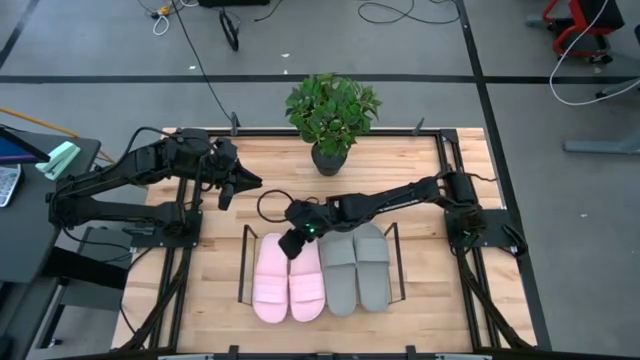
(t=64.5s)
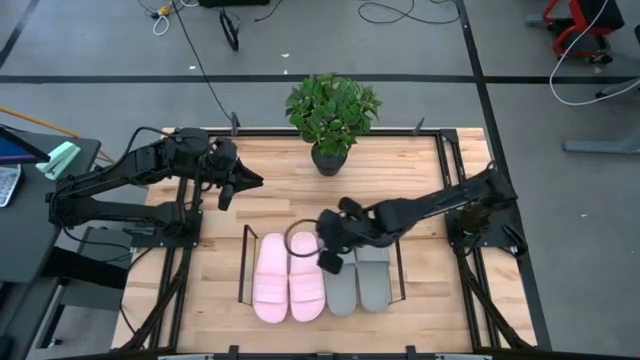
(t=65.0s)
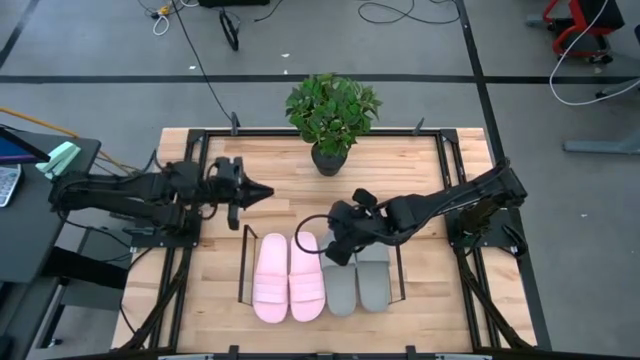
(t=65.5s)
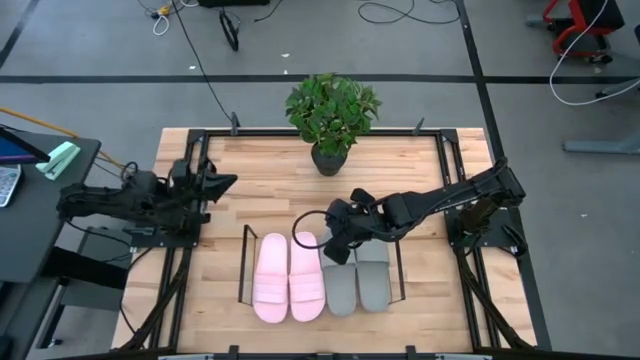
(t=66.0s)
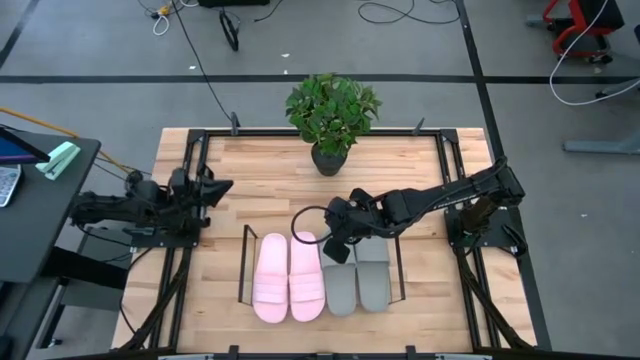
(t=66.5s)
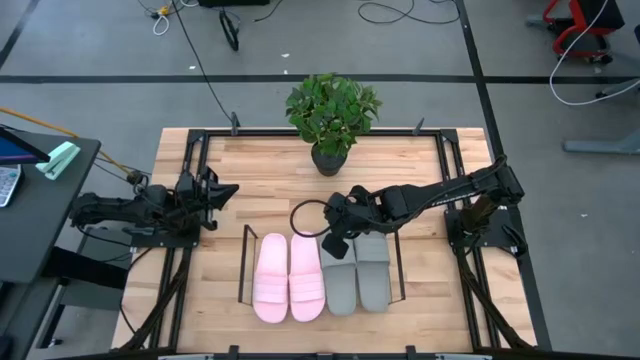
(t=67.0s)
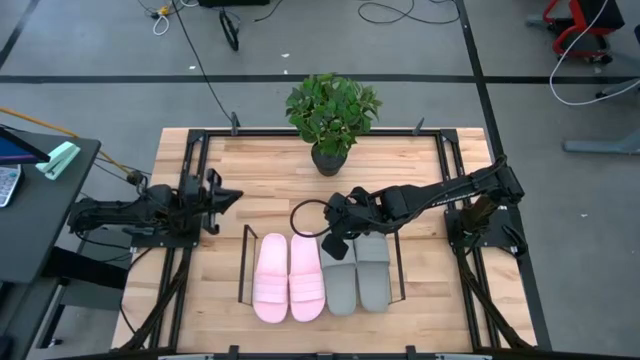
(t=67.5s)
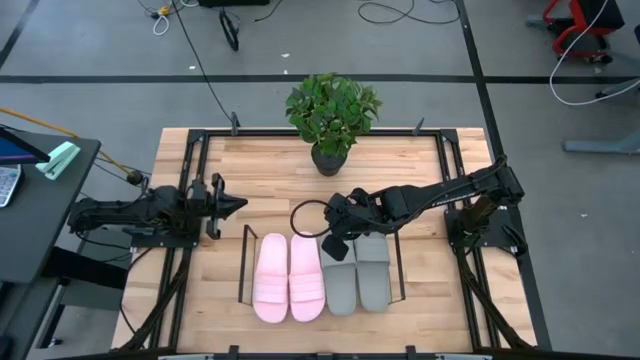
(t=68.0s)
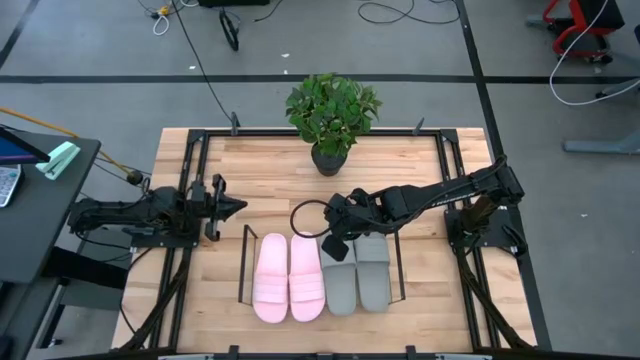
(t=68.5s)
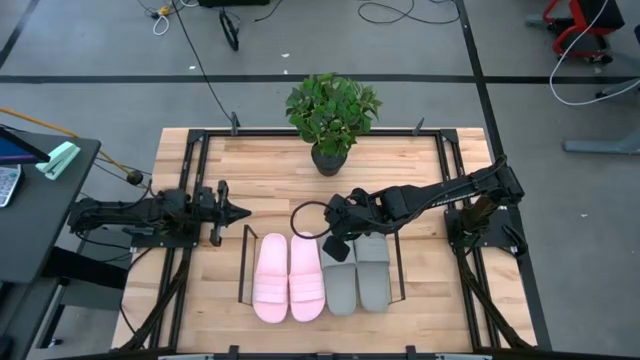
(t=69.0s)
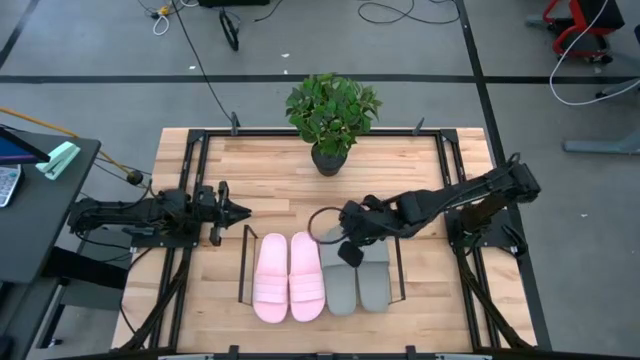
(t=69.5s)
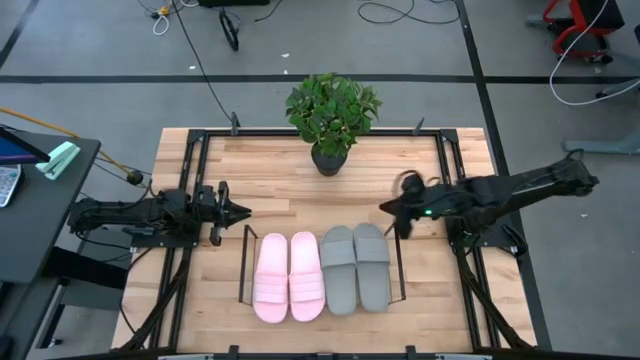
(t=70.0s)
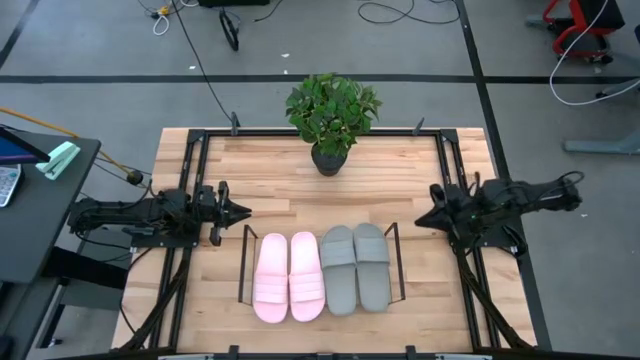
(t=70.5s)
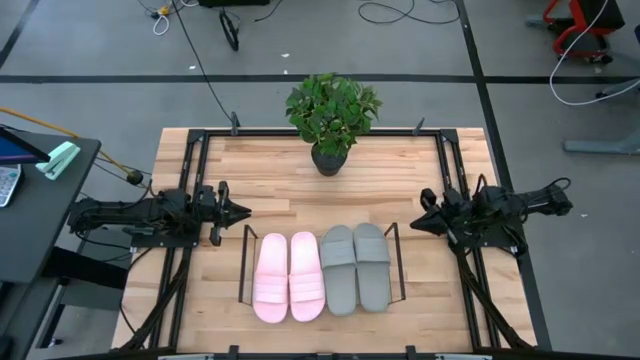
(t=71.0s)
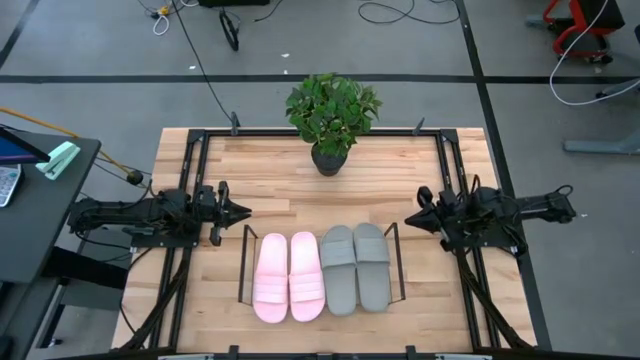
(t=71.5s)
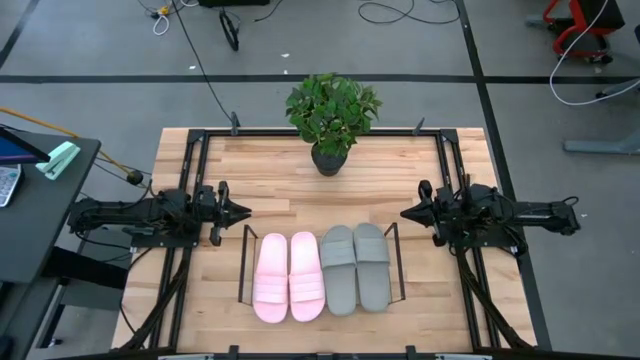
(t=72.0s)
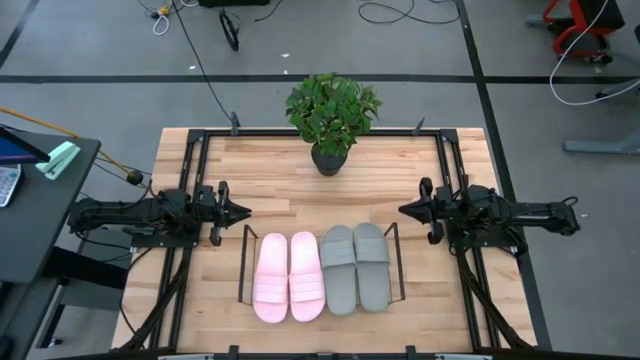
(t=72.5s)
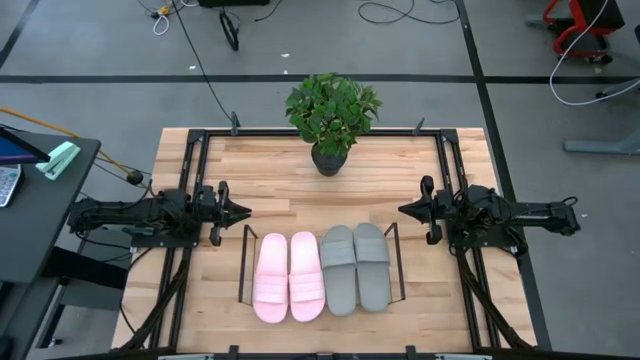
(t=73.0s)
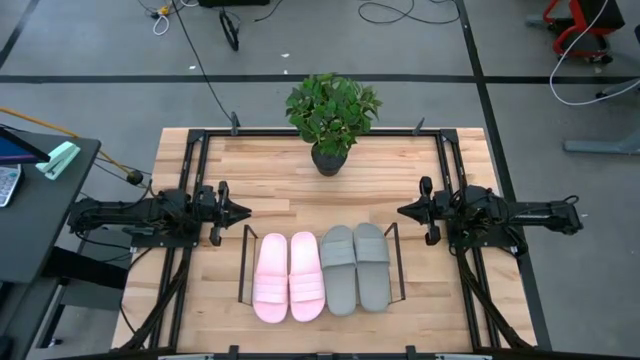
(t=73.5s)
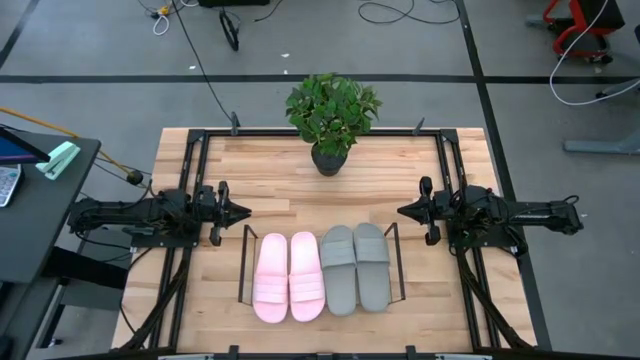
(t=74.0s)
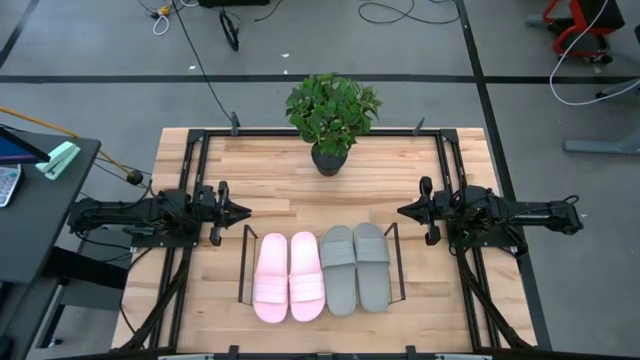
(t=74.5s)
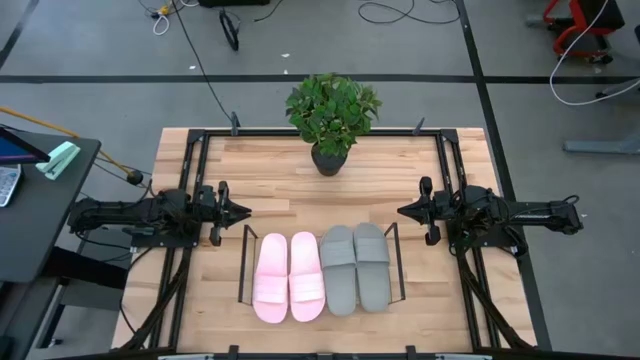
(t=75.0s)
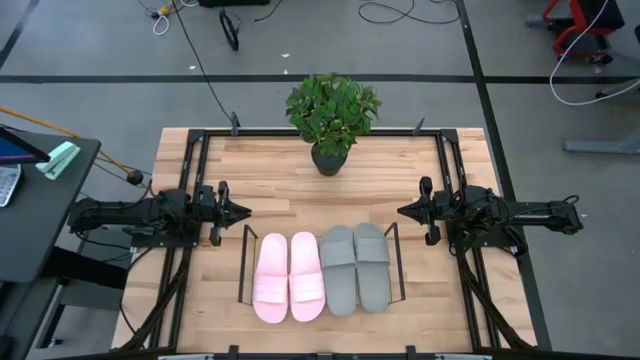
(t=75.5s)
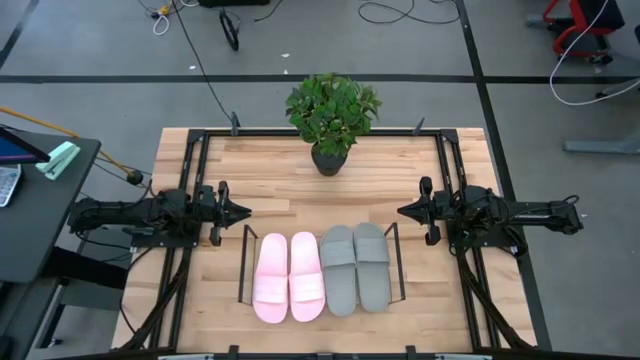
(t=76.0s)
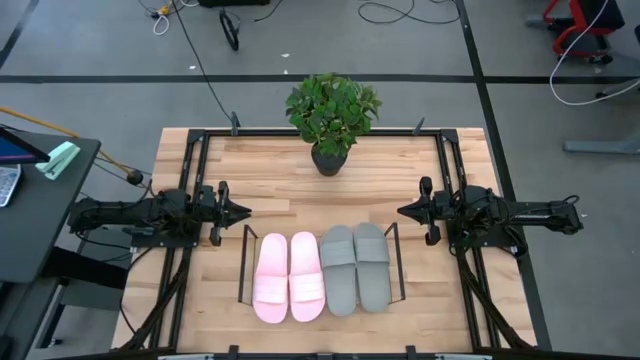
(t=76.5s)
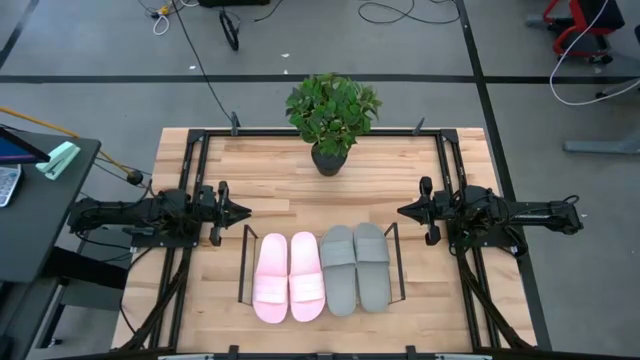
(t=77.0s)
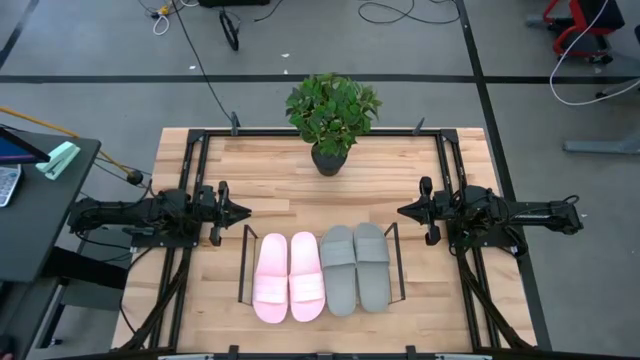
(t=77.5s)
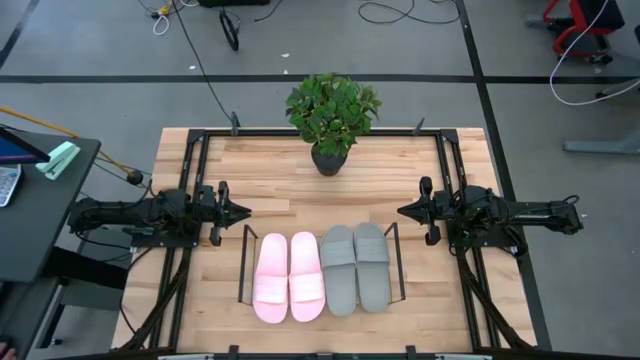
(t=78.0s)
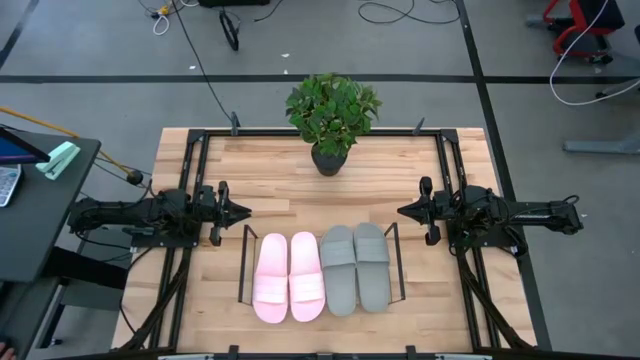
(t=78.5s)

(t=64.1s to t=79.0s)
Task: Pick and place slides into the shelf
Return to Home Position
